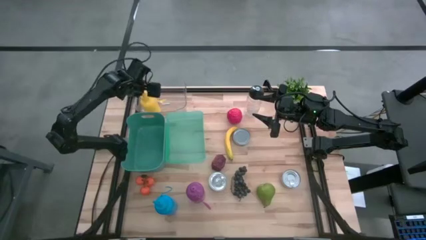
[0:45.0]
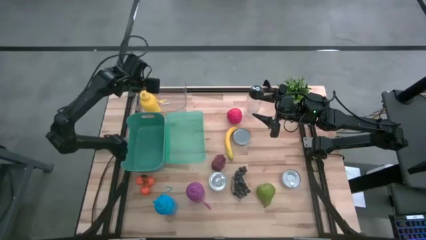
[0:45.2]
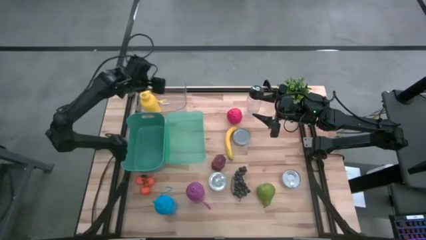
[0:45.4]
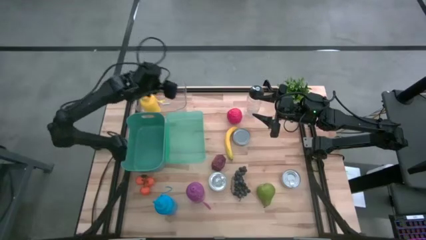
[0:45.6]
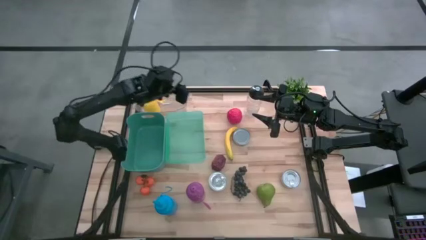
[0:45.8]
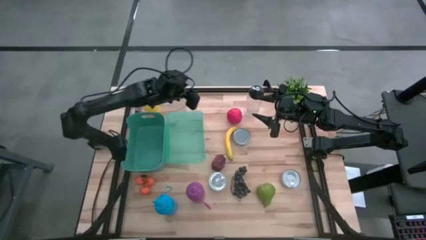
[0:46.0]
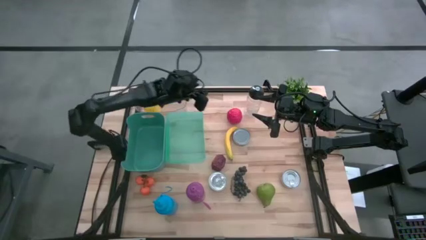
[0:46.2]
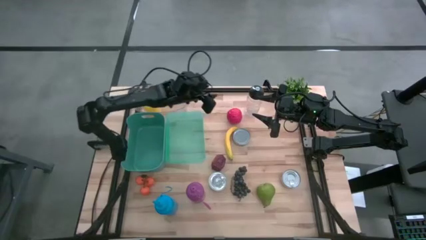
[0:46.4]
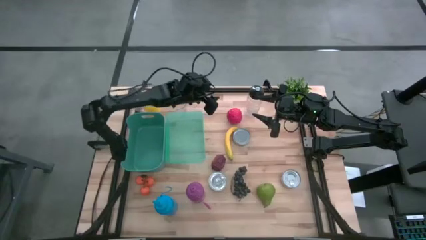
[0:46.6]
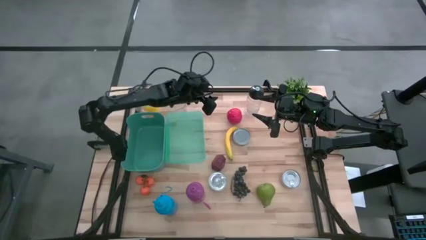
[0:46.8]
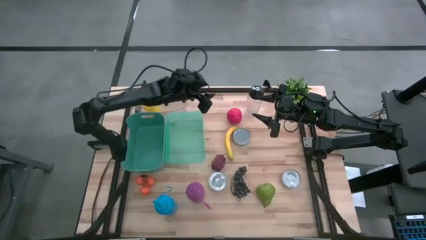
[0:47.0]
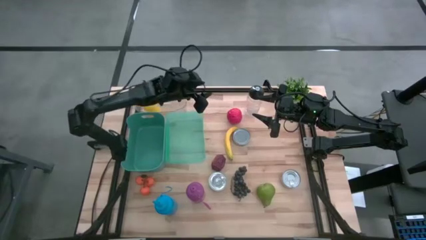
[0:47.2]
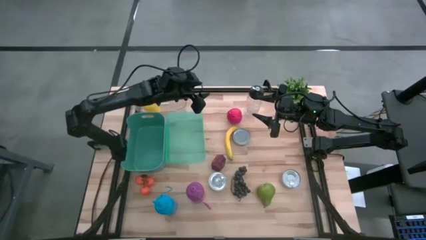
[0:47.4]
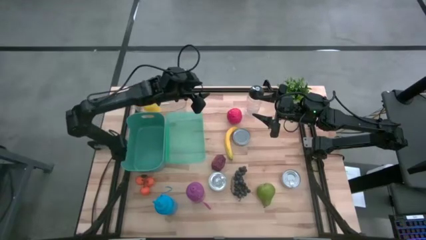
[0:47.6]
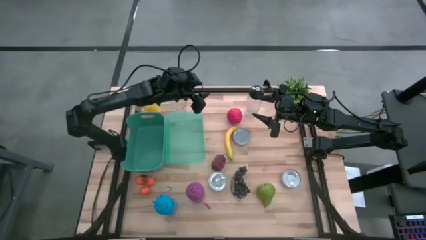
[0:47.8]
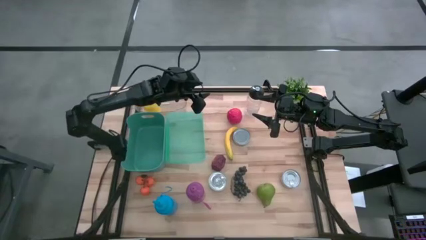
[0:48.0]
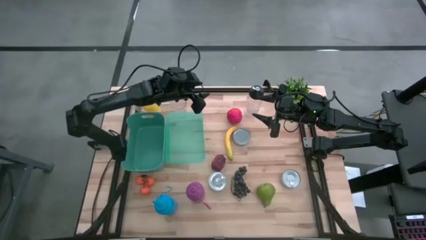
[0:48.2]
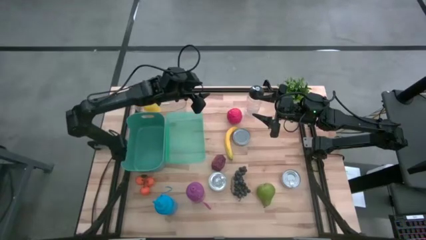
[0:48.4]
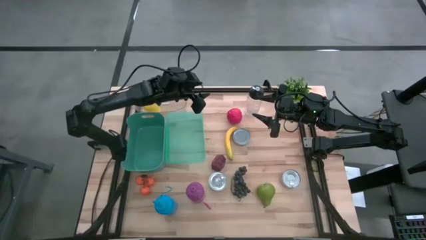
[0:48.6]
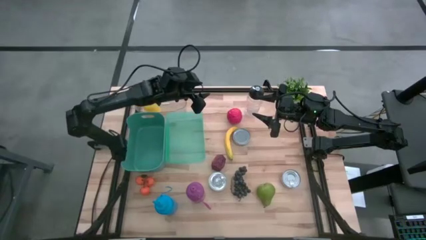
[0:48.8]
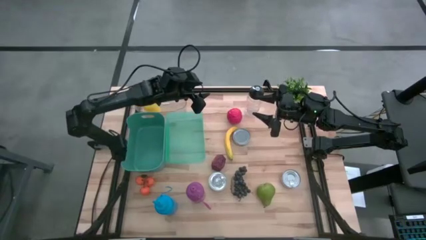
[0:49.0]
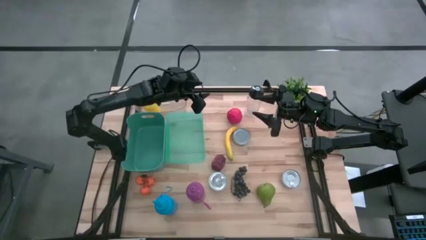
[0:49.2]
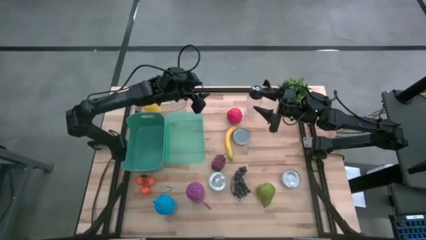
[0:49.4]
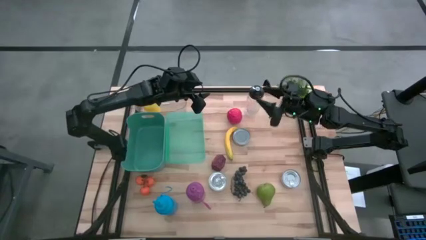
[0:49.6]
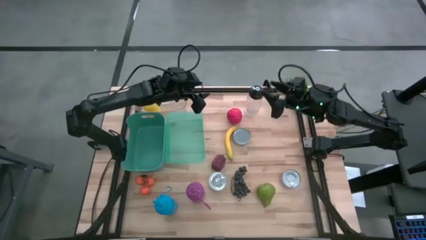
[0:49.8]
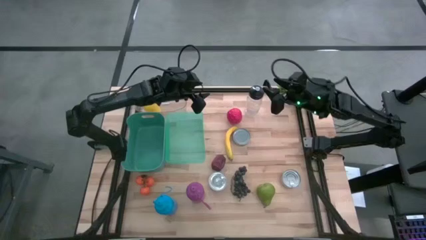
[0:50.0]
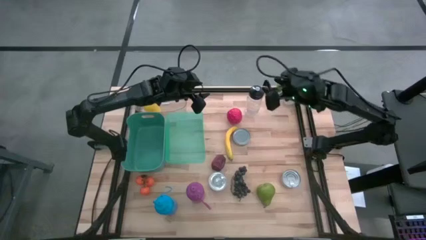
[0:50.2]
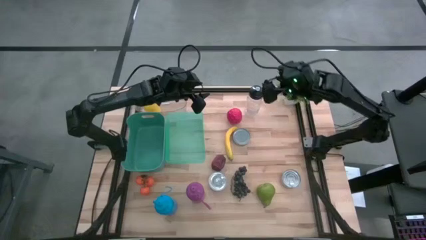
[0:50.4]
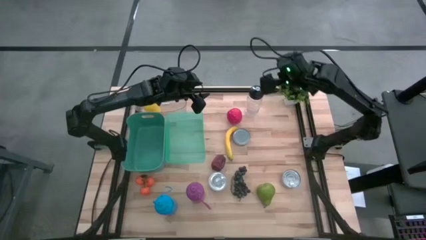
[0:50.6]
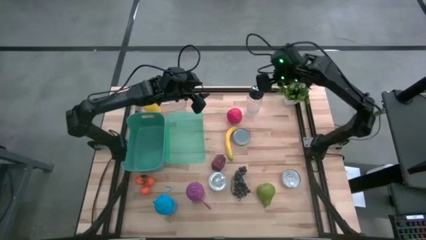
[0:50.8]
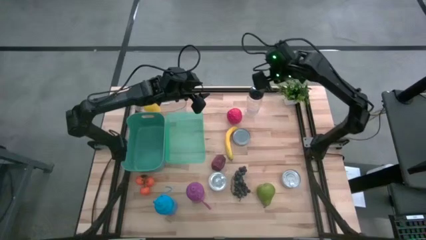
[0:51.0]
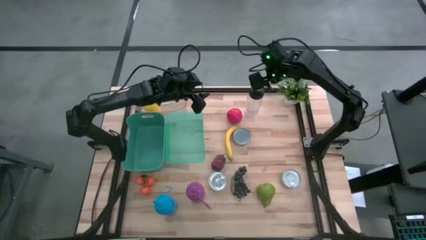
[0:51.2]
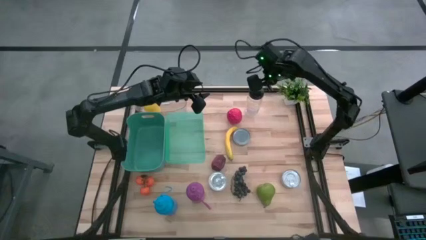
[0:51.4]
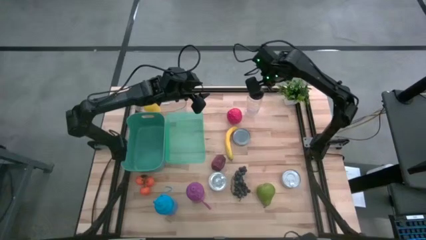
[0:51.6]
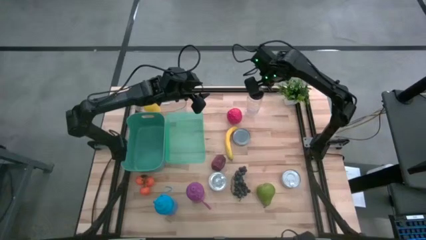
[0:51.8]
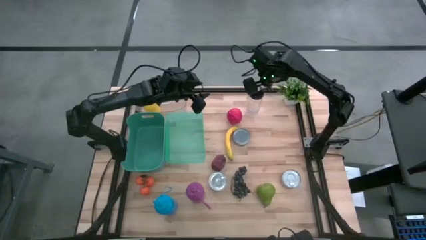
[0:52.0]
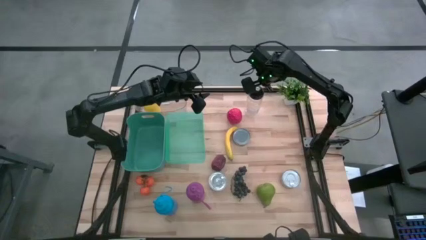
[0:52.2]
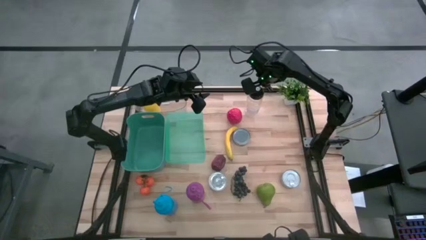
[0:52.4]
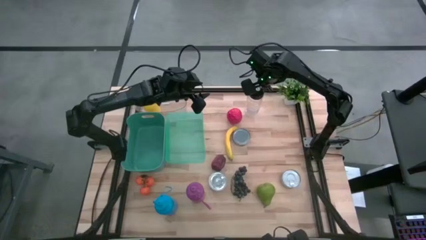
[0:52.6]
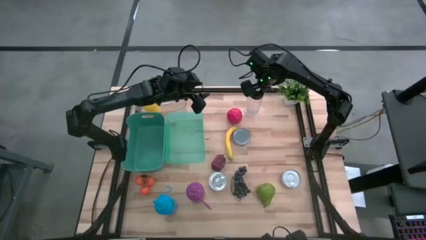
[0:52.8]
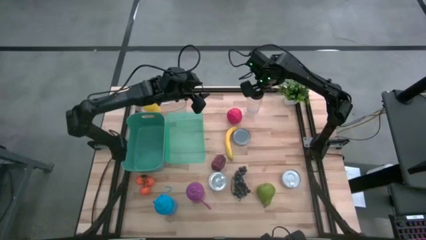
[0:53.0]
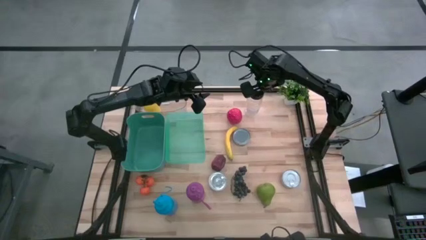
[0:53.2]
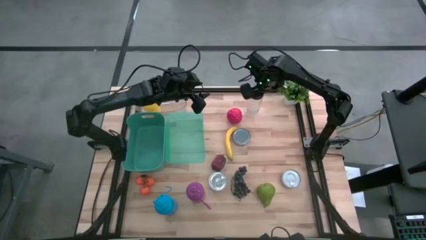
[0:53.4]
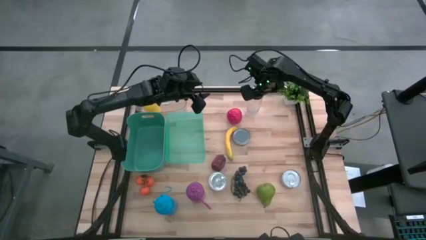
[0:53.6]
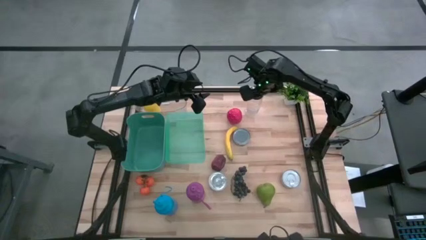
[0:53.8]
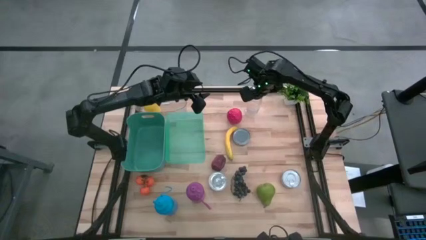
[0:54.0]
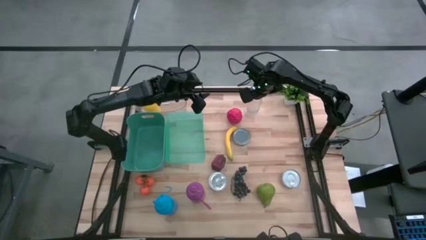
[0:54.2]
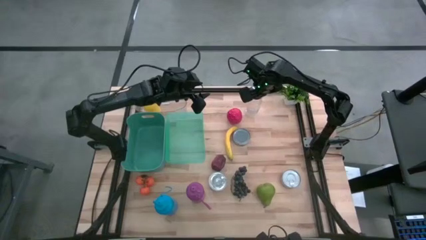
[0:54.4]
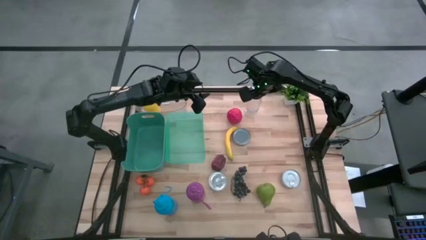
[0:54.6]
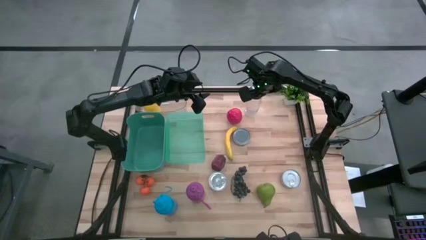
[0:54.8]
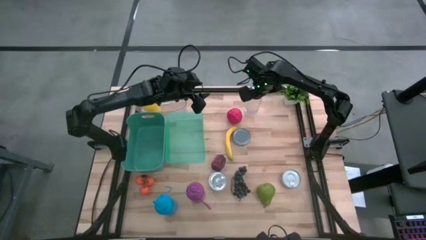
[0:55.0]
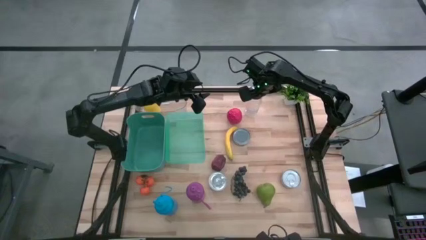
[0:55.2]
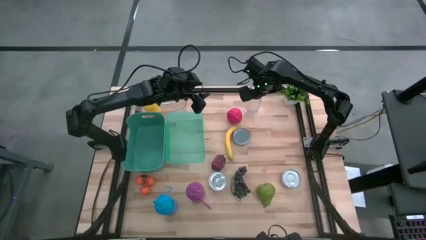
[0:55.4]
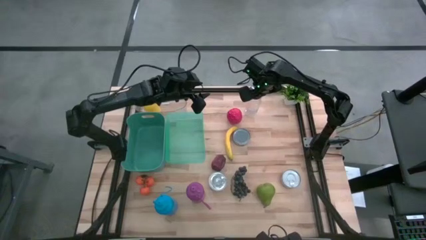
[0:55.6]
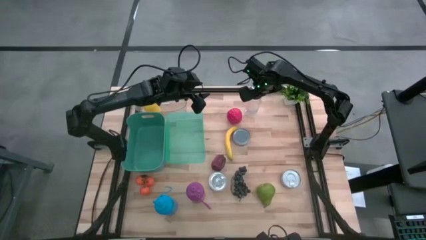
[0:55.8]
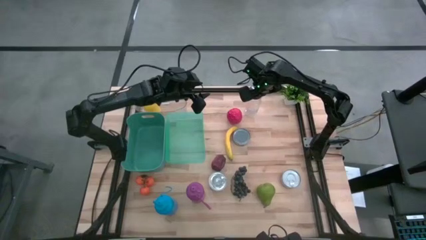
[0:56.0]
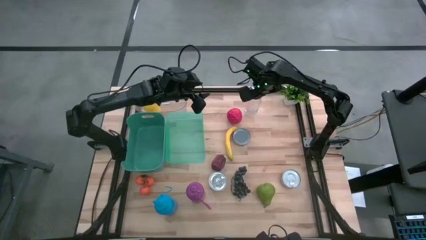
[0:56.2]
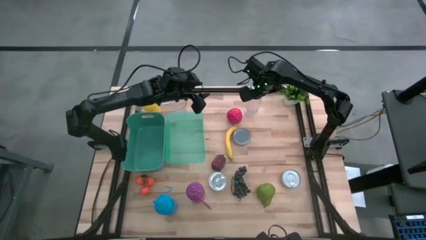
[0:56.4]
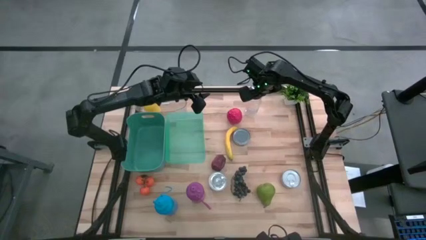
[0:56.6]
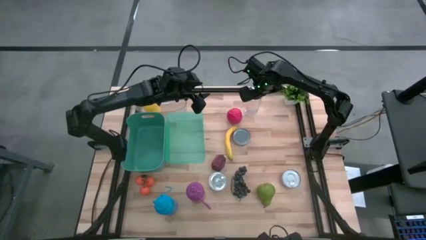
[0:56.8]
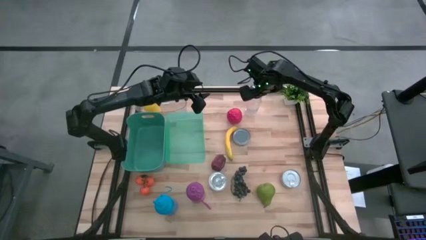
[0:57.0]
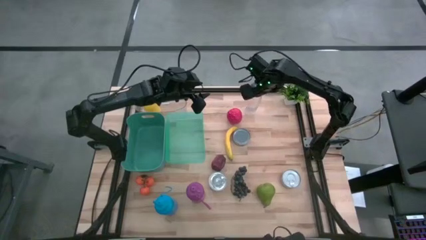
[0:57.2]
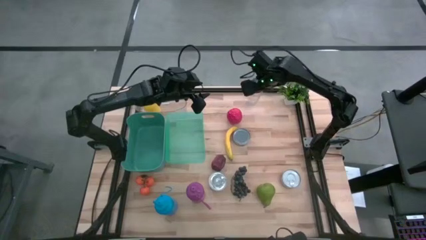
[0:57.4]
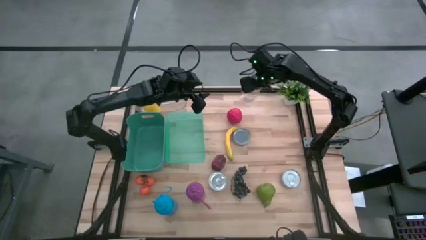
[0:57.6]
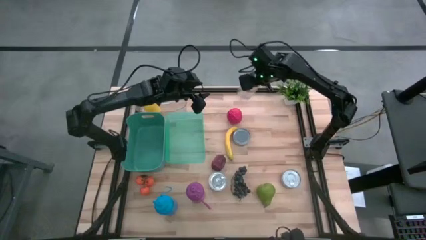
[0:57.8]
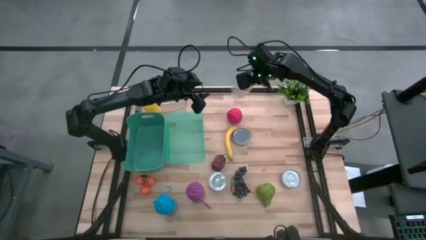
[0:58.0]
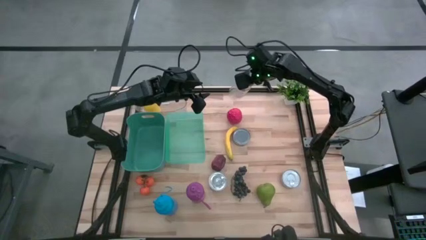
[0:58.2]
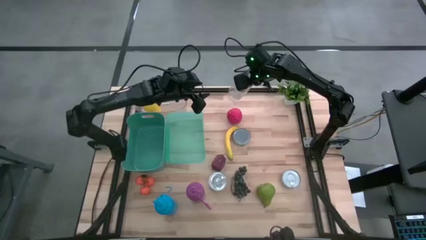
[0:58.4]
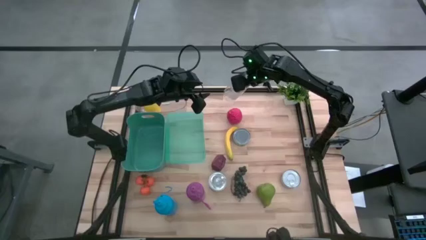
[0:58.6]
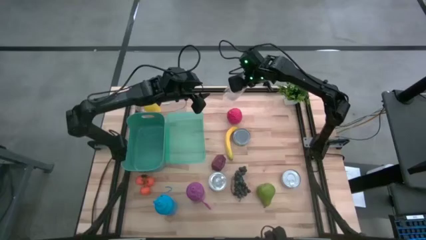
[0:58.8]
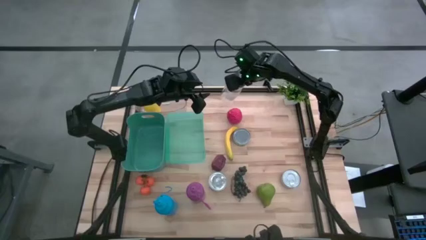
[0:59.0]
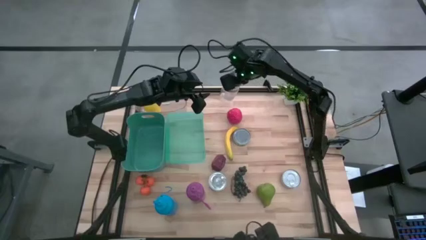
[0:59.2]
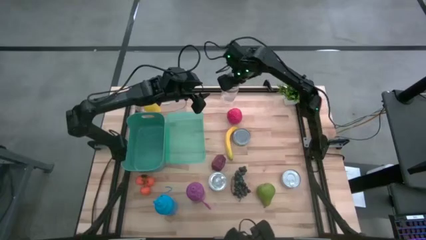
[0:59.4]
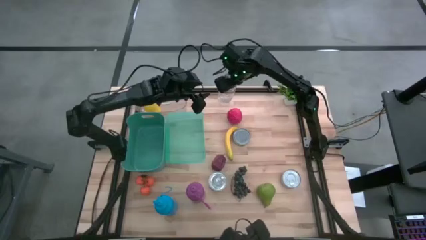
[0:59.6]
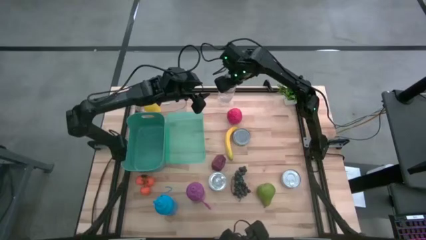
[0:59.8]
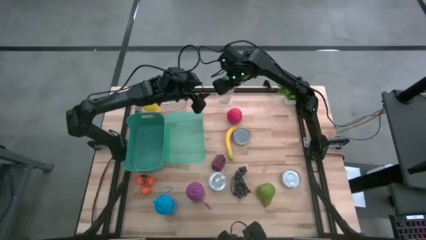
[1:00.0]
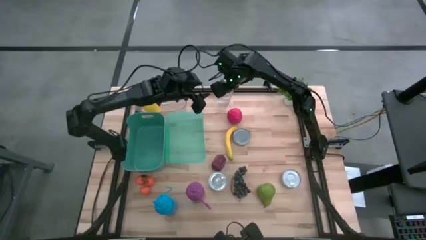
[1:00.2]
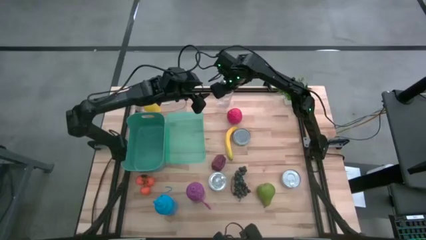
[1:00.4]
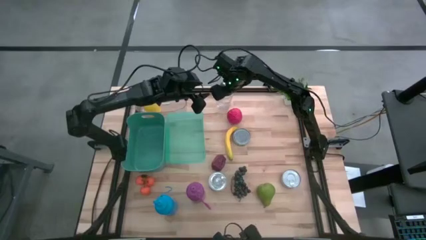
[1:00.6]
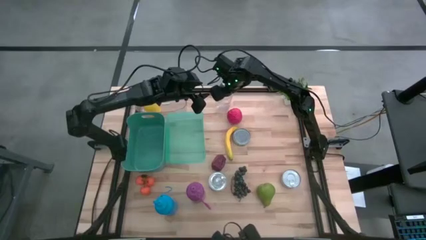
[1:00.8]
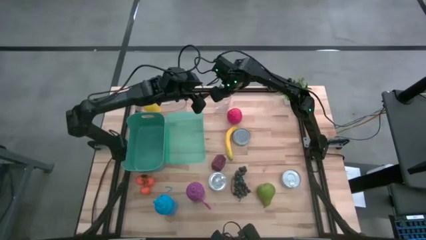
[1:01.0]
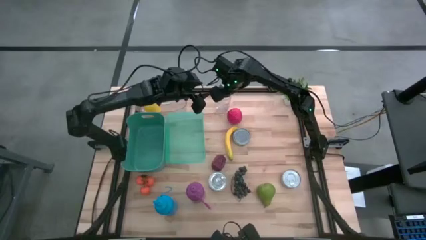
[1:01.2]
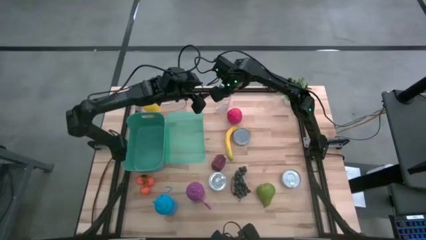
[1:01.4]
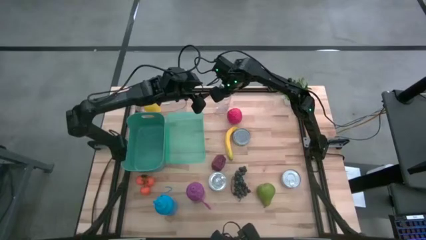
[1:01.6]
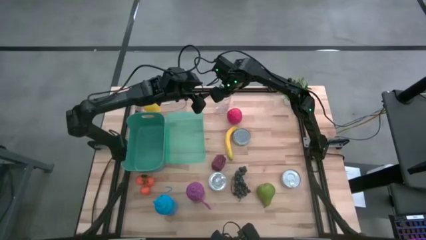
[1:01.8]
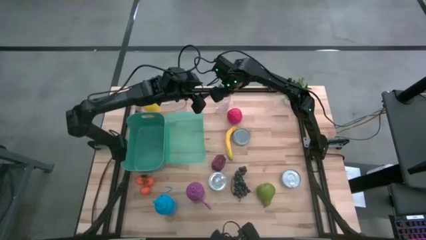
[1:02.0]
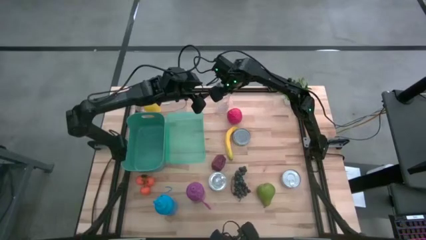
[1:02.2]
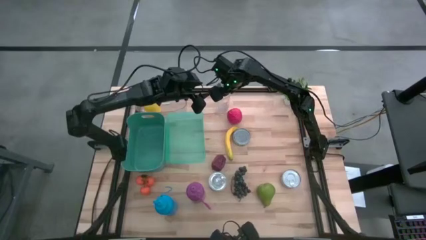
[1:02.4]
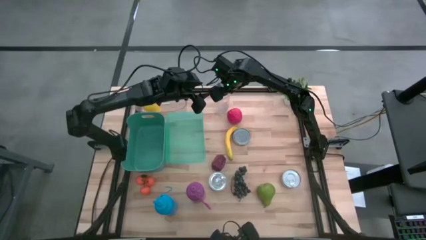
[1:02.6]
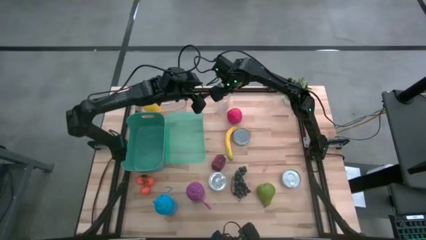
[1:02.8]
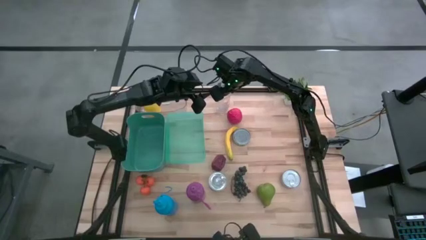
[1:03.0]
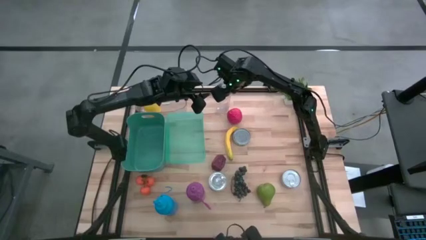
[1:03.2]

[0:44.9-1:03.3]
Task: Pick & Place Food Item
Put the transparent water bottle into the transparent bin
